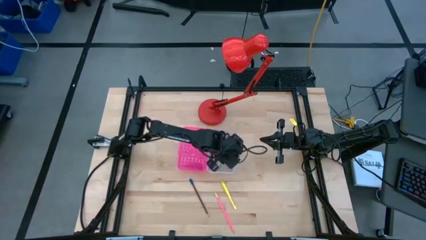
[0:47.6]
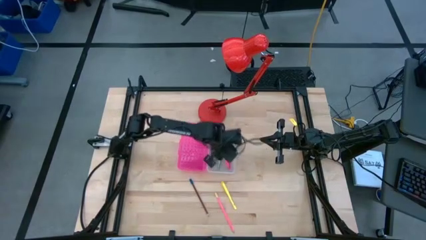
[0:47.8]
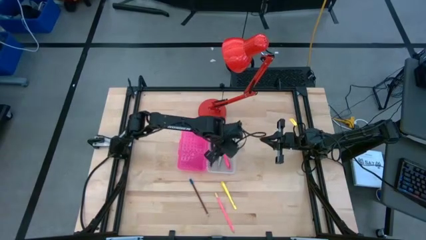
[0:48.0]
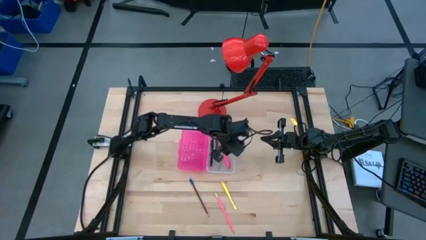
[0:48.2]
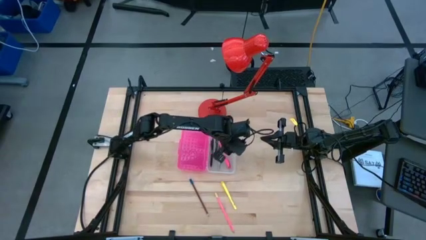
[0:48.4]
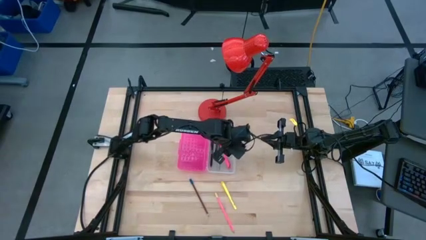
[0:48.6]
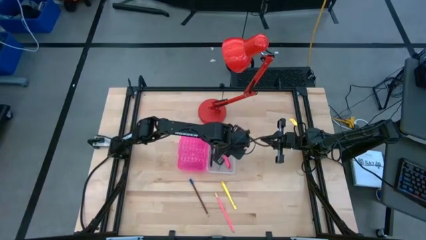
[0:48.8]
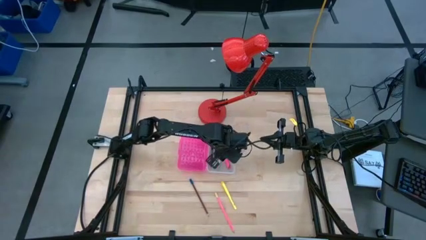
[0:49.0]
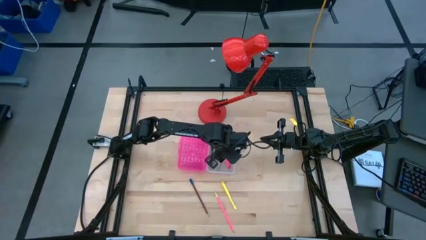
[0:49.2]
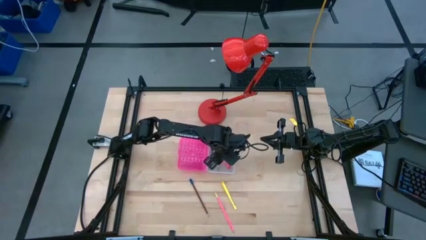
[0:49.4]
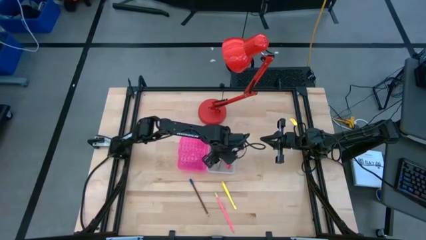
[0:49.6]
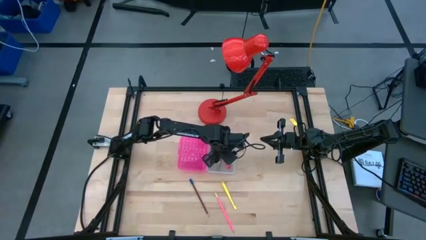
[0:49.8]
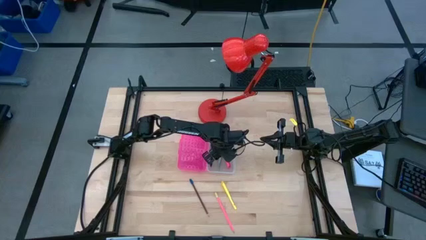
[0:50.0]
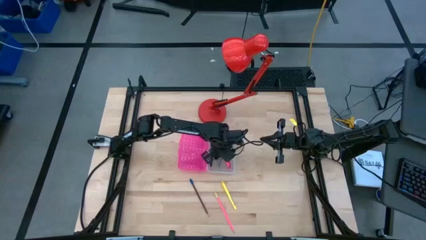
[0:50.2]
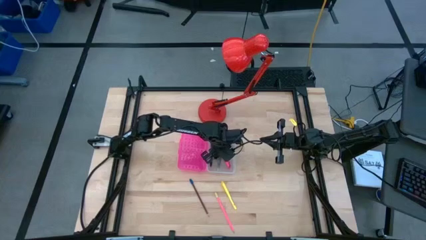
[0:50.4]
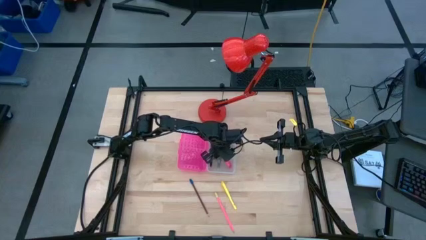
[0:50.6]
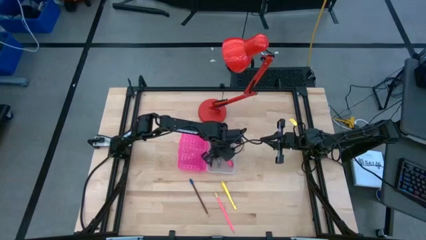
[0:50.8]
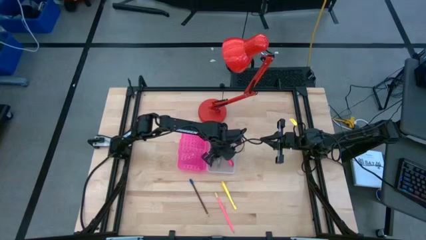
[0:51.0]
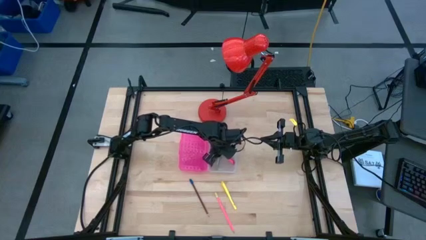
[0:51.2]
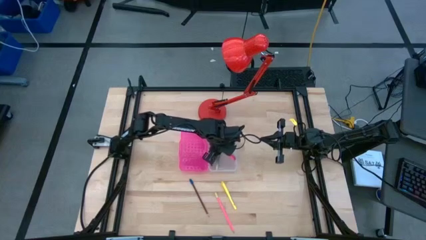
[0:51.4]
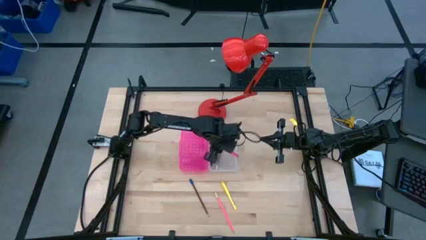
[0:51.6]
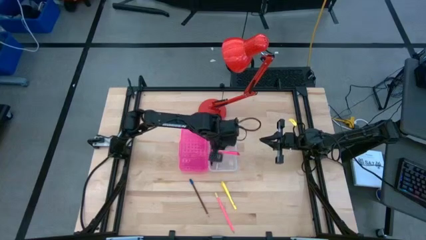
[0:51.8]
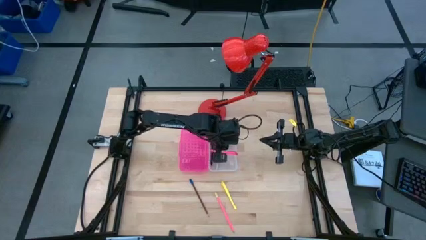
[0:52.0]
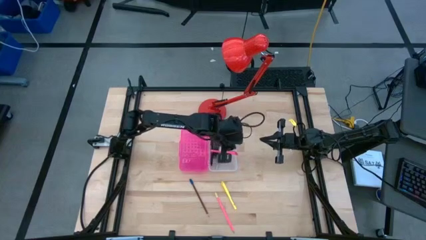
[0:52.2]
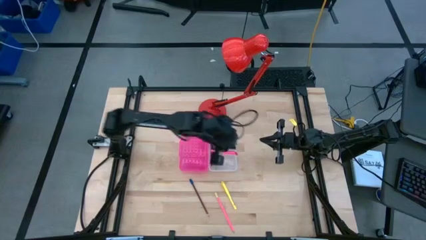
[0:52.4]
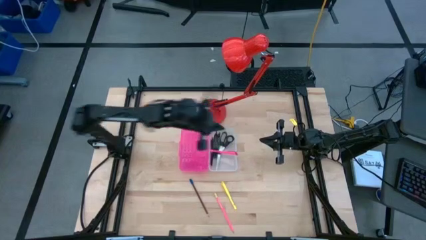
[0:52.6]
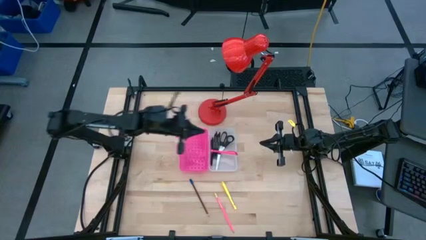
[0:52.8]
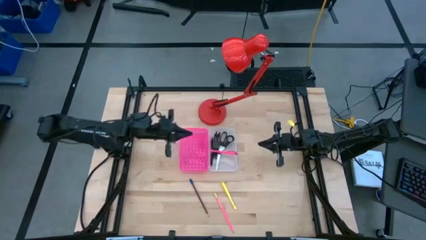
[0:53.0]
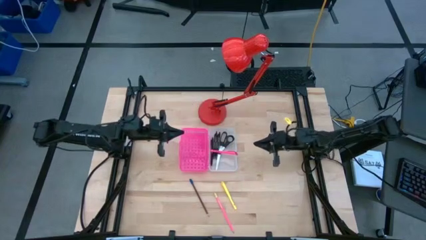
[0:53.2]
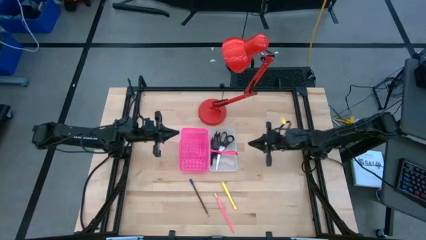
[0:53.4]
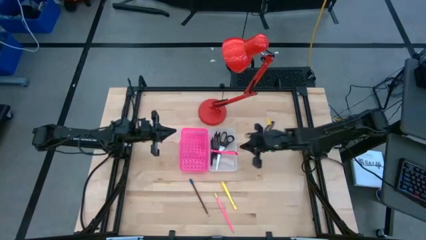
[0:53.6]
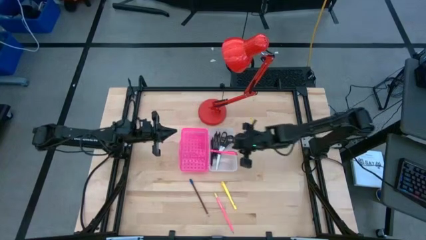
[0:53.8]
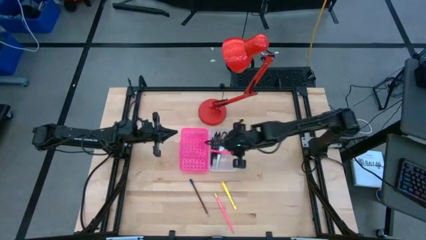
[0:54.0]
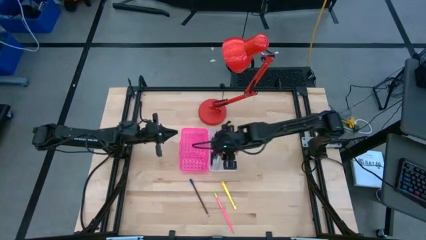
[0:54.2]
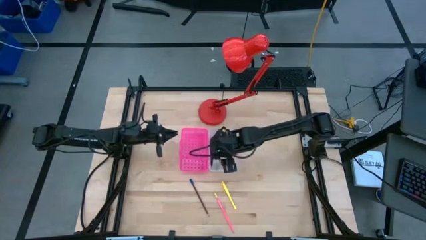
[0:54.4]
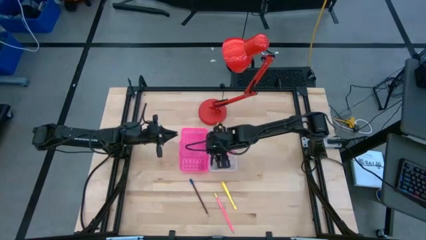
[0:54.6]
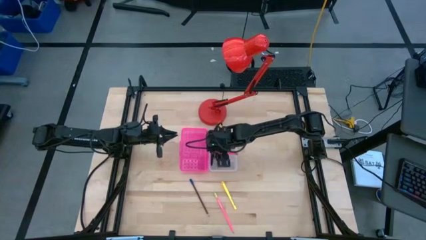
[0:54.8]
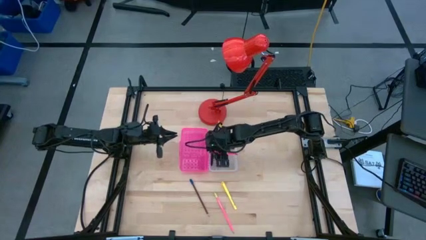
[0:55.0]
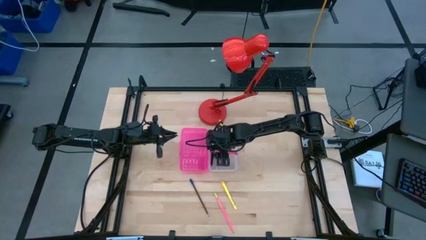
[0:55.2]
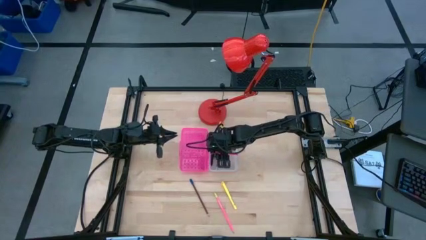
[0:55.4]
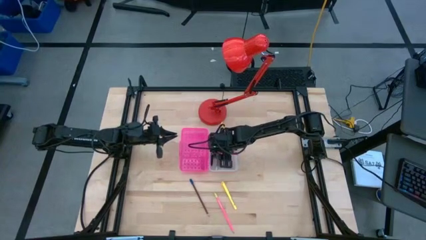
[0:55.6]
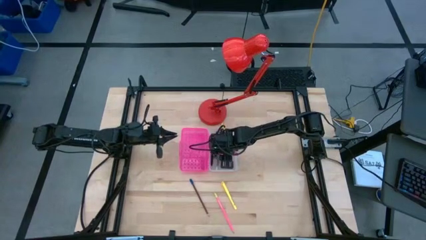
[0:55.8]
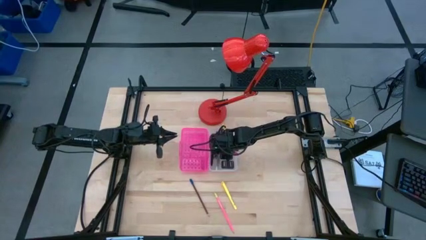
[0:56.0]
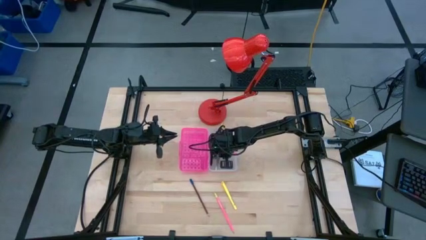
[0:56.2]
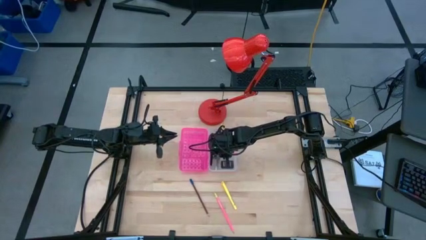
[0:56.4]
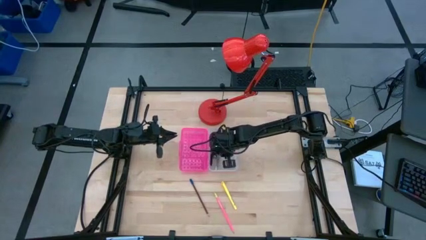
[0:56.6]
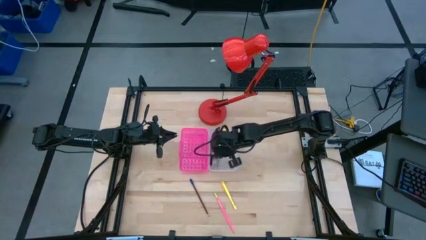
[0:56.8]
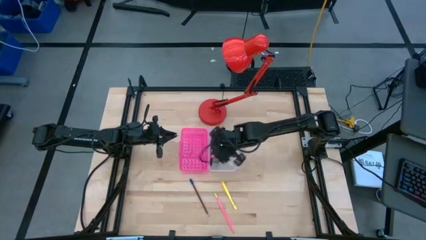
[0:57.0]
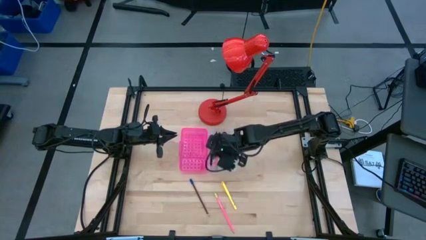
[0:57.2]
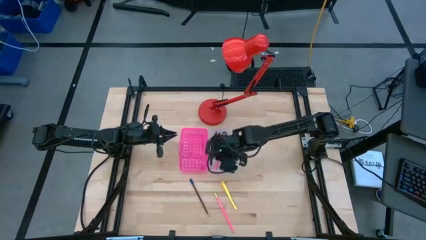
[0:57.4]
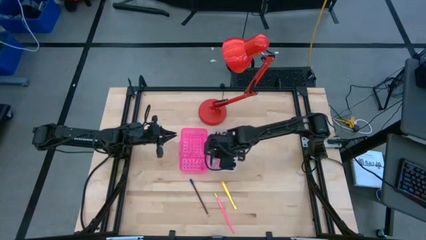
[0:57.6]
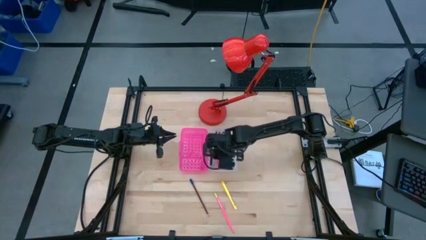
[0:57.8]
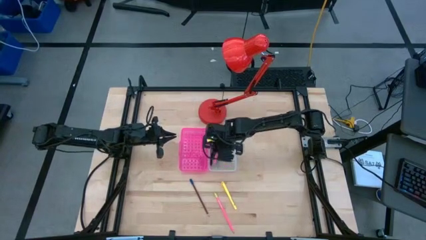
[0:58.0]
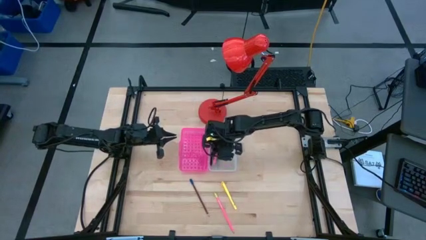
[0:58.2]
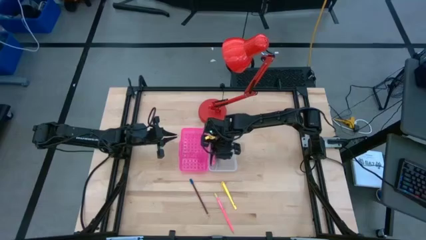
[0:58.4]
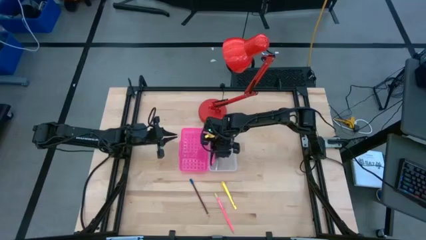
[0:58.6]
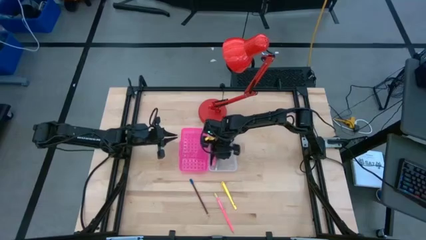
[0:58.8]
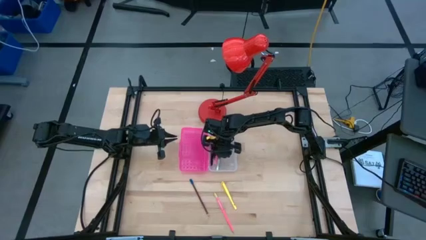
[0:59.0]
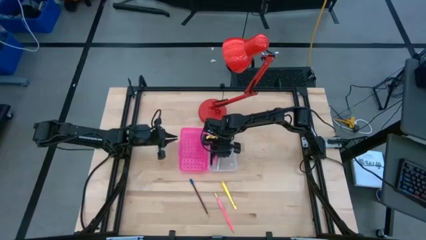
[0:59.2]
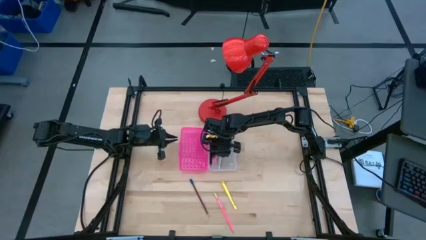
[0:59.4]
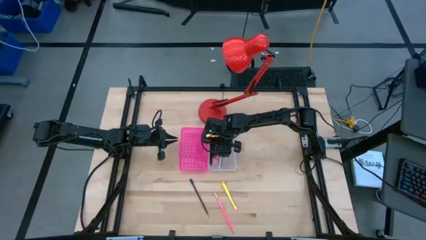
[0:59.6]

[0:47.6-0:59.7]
Task: Pick & place school supplies into a supply box
Put the pink pen into the supply box

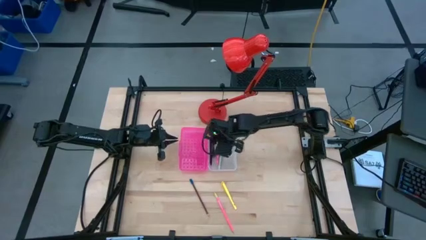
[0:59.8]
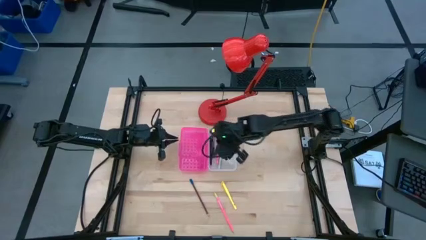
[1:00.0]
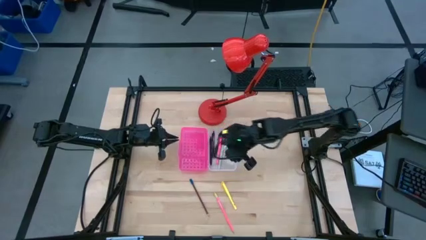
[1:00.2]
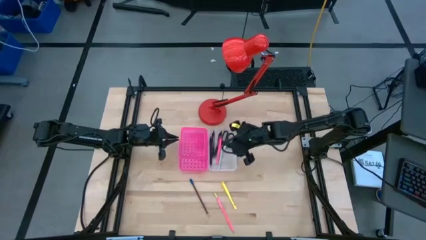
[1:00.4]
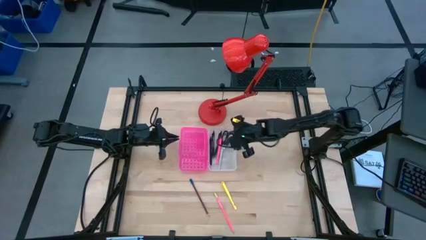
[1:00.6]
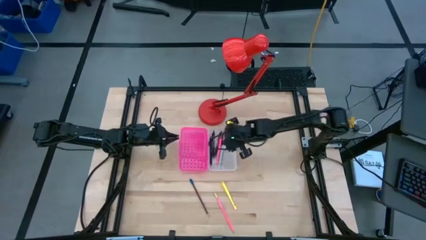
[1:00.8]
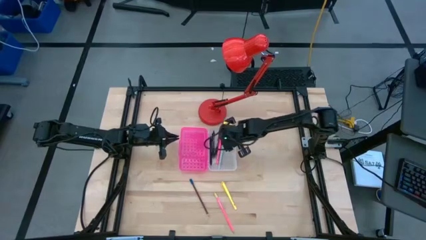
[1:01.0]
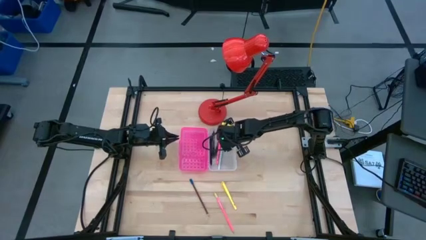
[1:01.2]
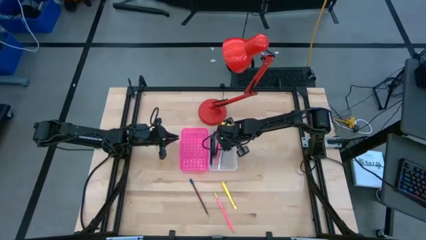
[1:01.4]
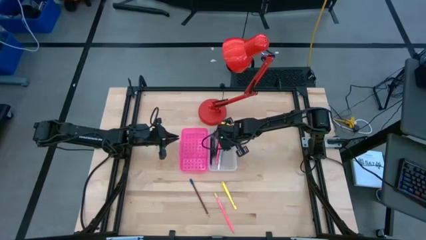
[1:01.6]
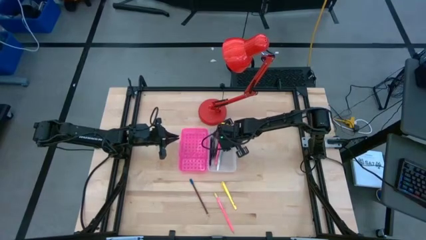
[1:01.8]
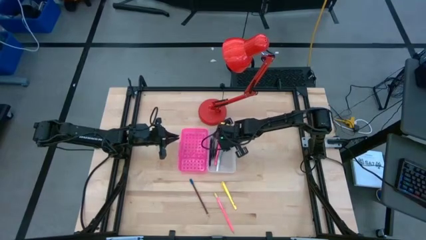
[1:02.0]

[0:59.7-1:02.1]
Adjust the scissors into the supply box
